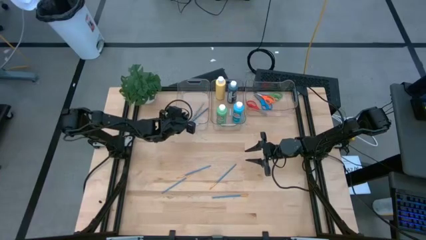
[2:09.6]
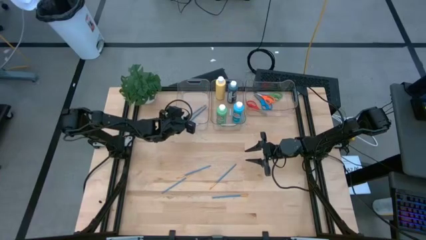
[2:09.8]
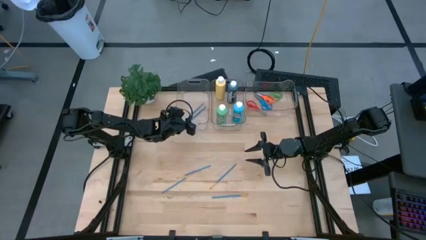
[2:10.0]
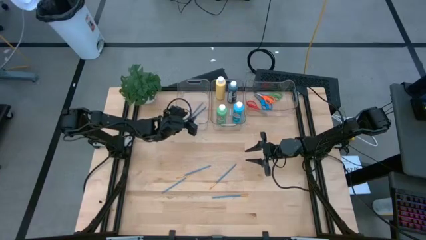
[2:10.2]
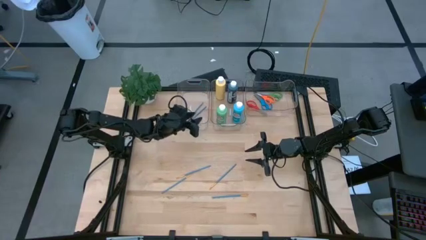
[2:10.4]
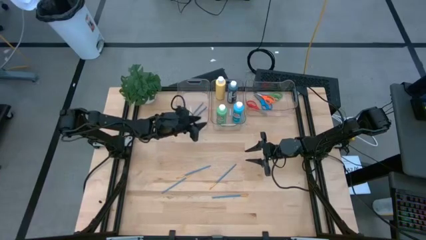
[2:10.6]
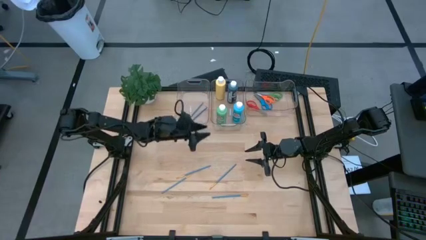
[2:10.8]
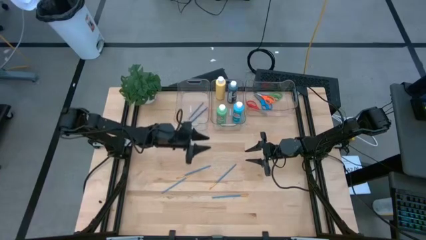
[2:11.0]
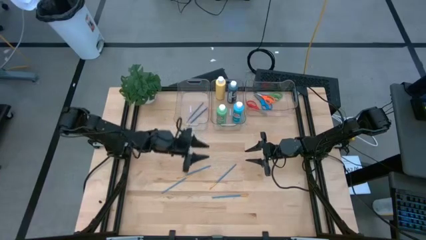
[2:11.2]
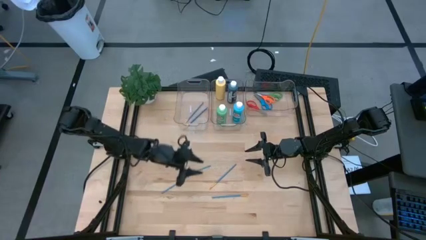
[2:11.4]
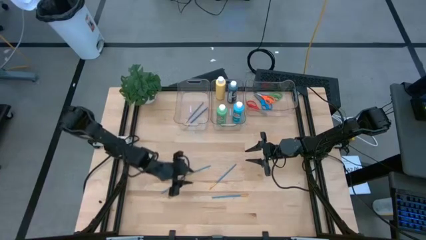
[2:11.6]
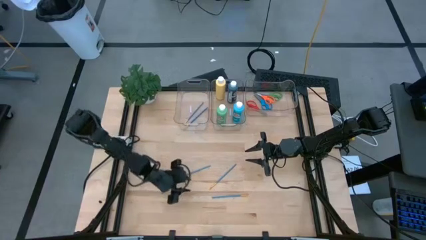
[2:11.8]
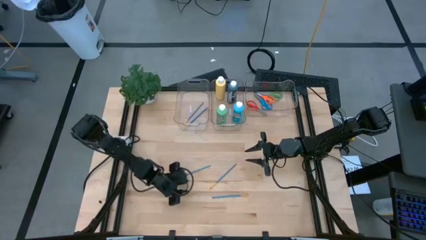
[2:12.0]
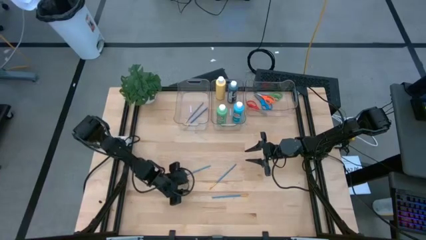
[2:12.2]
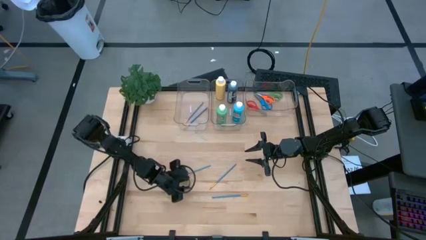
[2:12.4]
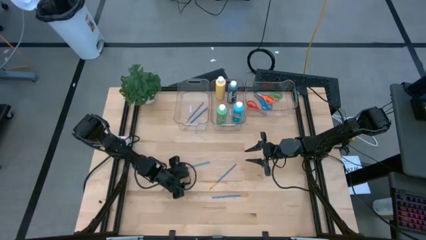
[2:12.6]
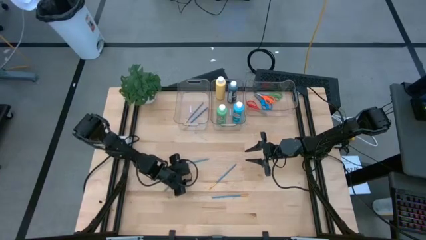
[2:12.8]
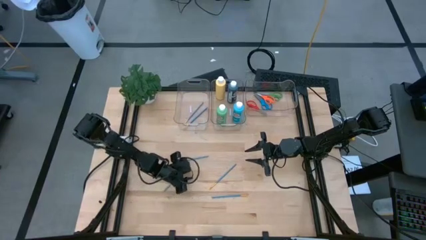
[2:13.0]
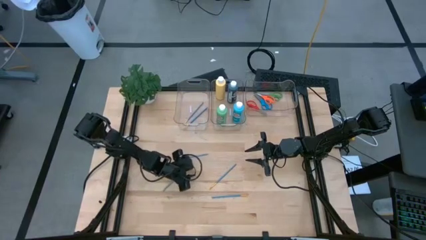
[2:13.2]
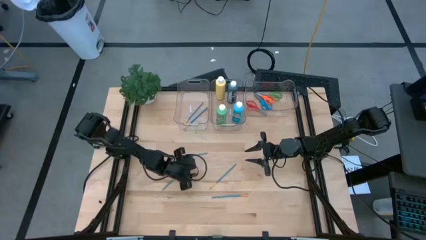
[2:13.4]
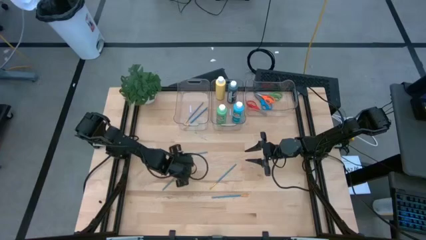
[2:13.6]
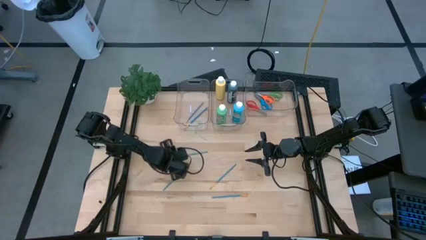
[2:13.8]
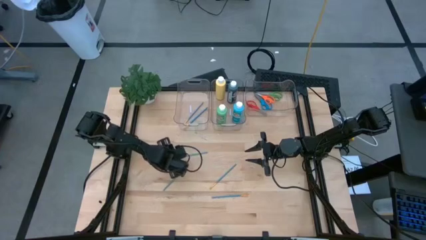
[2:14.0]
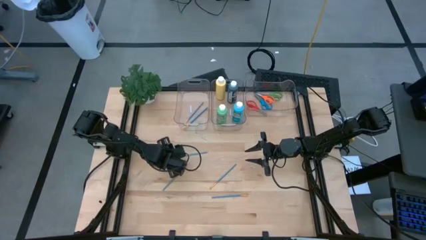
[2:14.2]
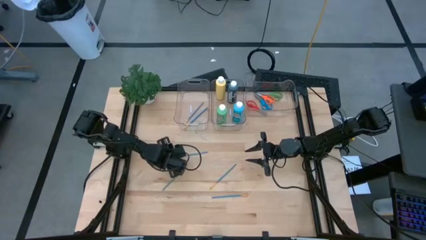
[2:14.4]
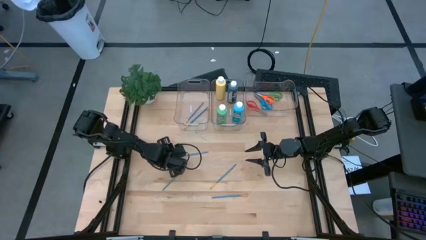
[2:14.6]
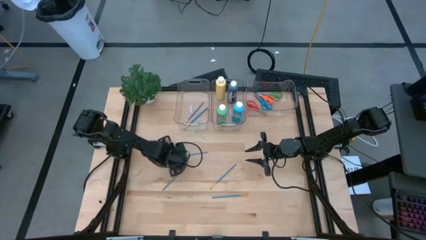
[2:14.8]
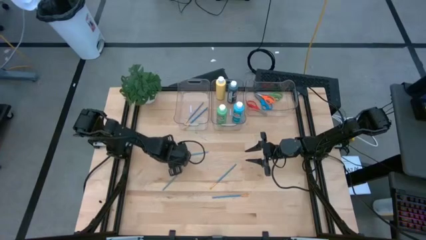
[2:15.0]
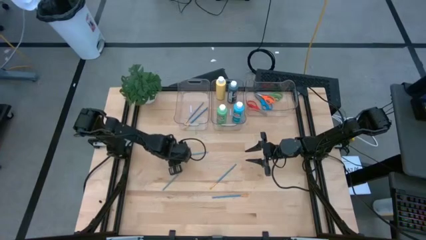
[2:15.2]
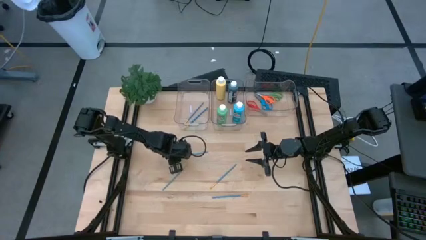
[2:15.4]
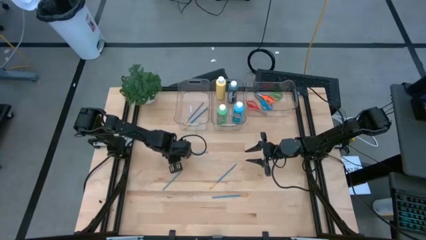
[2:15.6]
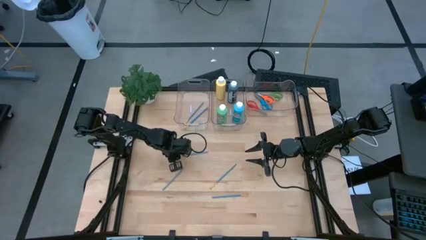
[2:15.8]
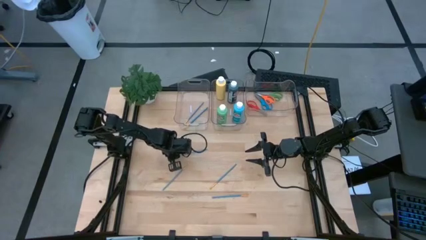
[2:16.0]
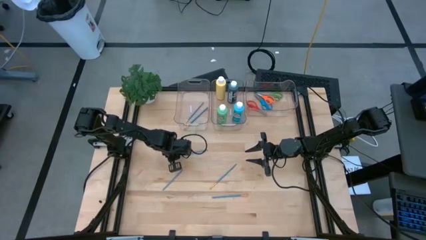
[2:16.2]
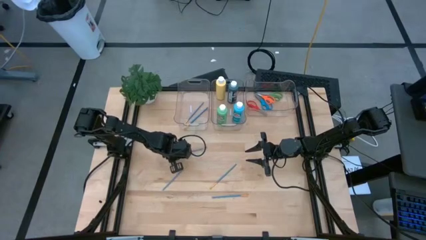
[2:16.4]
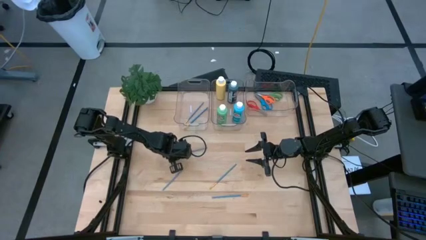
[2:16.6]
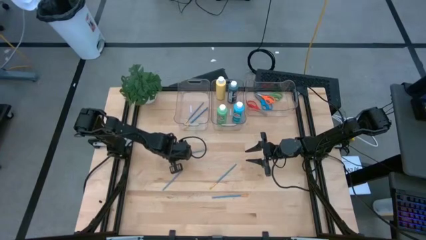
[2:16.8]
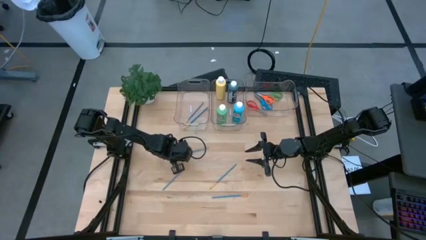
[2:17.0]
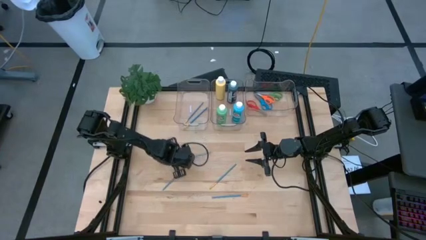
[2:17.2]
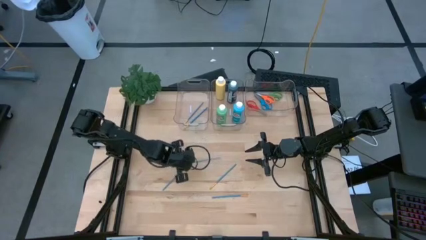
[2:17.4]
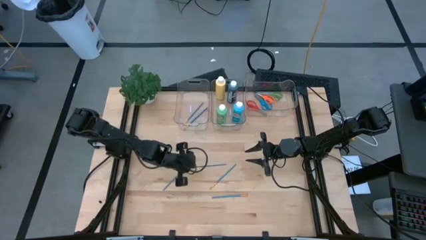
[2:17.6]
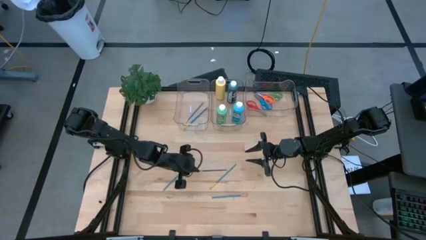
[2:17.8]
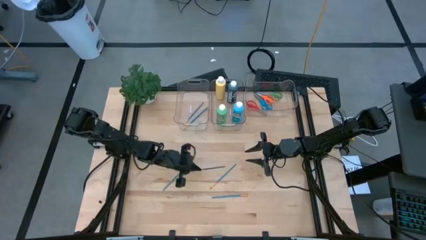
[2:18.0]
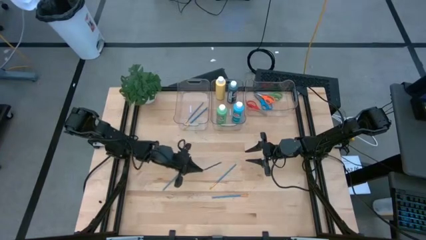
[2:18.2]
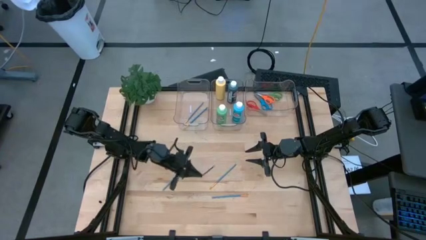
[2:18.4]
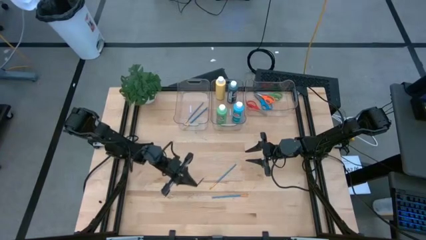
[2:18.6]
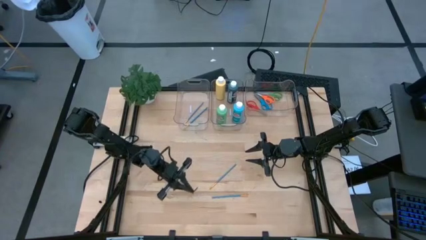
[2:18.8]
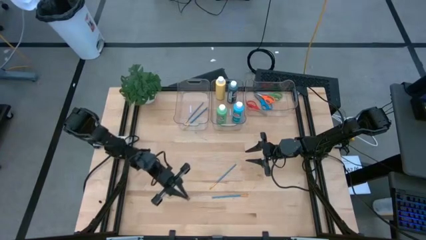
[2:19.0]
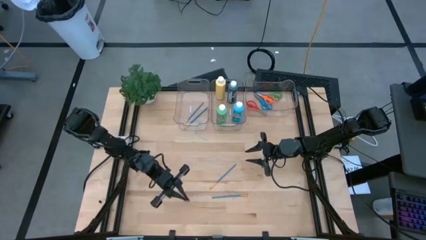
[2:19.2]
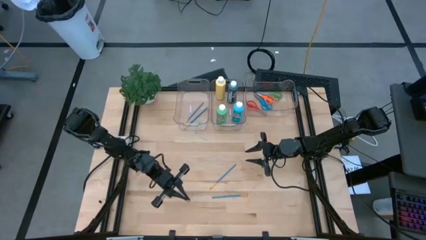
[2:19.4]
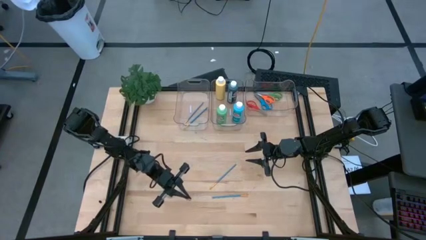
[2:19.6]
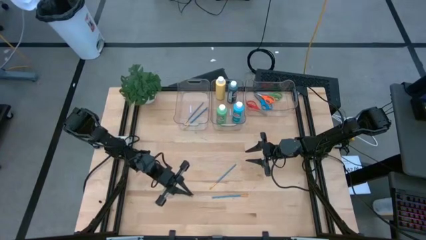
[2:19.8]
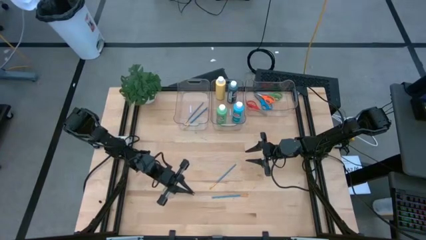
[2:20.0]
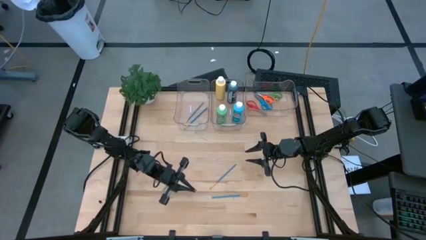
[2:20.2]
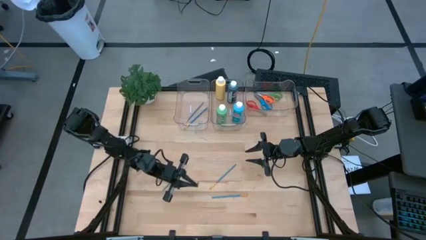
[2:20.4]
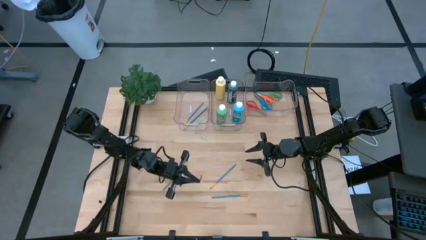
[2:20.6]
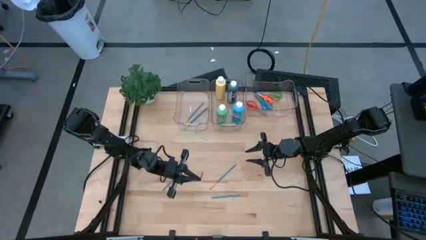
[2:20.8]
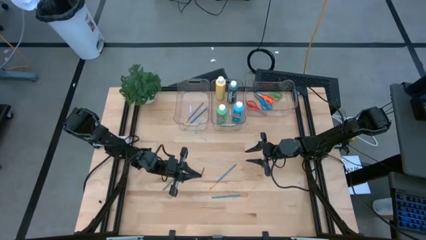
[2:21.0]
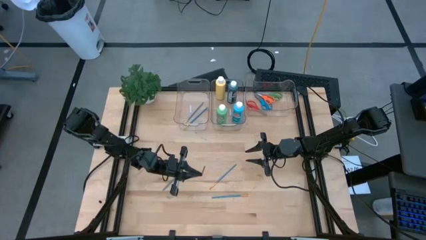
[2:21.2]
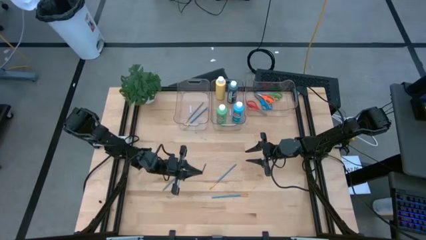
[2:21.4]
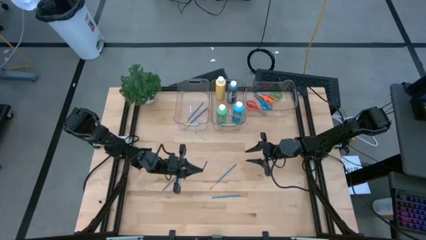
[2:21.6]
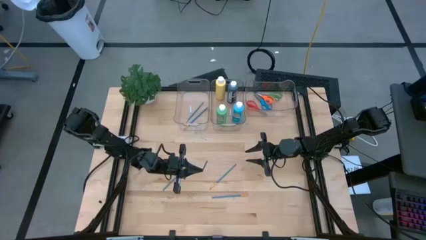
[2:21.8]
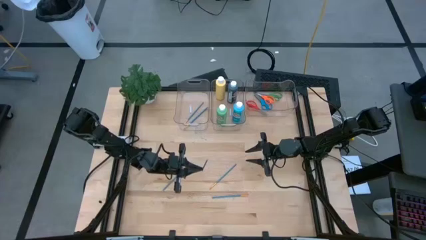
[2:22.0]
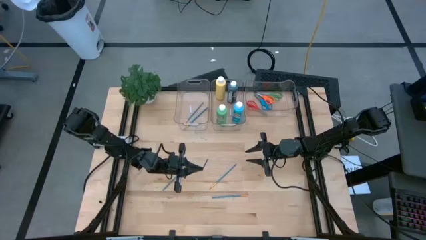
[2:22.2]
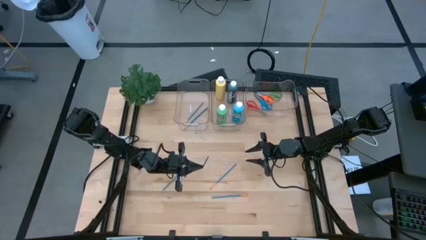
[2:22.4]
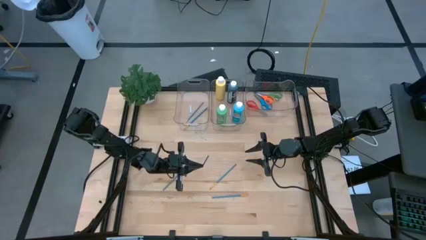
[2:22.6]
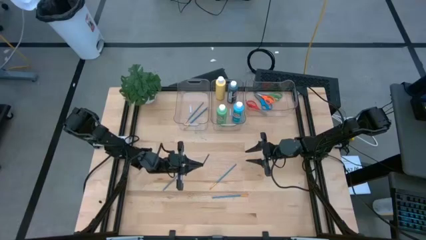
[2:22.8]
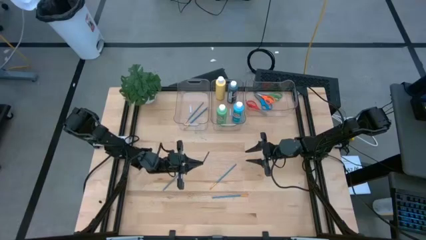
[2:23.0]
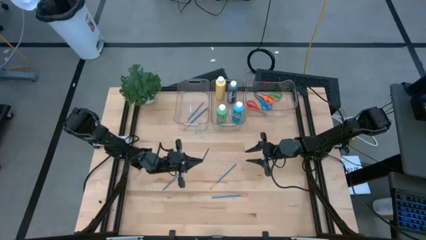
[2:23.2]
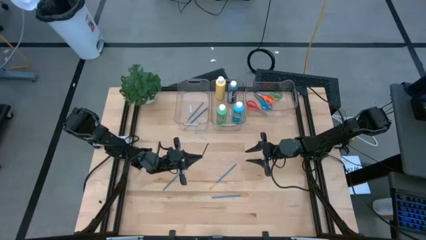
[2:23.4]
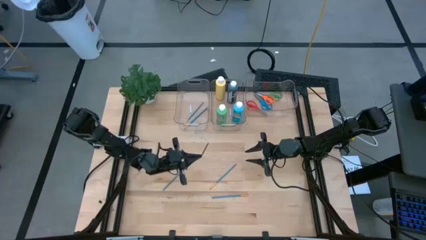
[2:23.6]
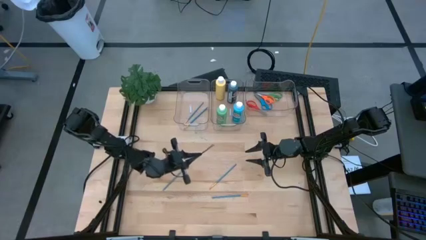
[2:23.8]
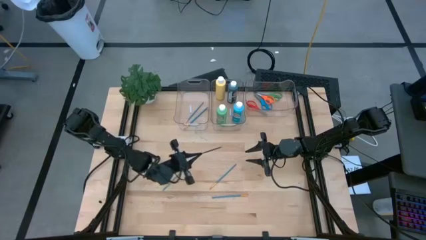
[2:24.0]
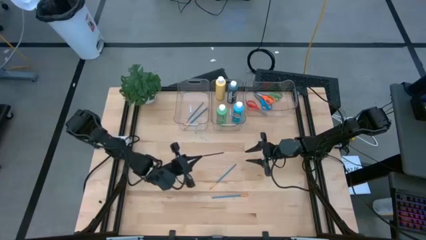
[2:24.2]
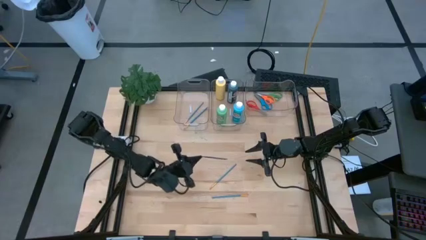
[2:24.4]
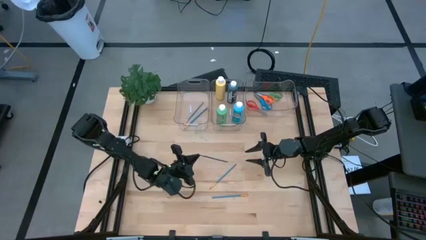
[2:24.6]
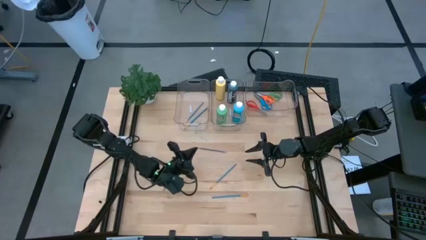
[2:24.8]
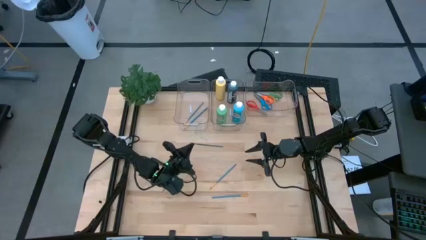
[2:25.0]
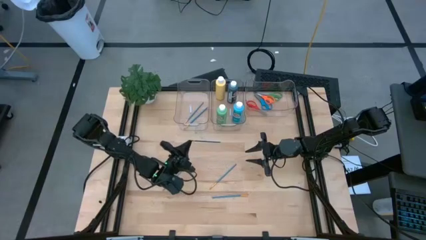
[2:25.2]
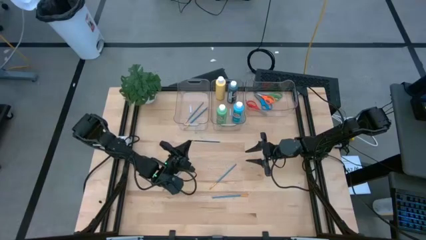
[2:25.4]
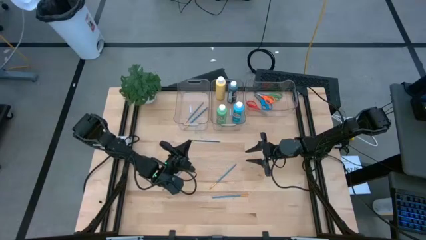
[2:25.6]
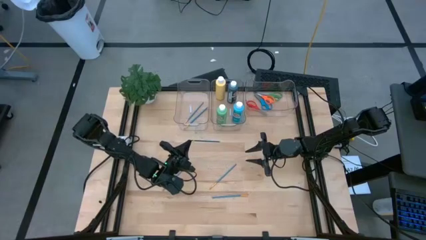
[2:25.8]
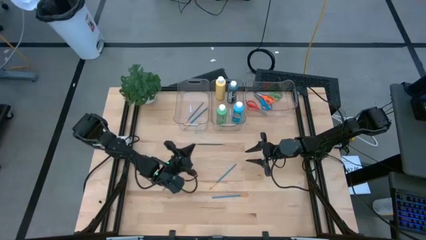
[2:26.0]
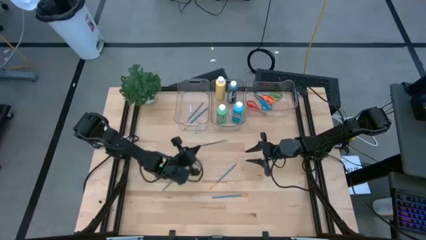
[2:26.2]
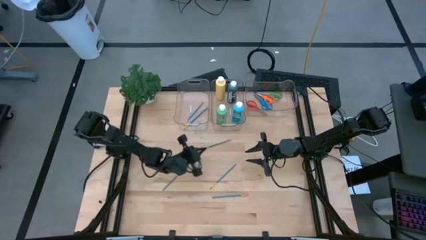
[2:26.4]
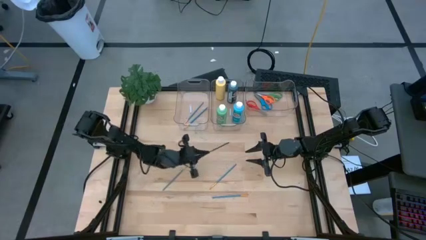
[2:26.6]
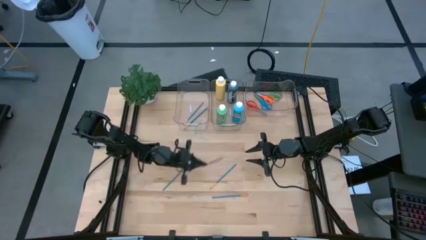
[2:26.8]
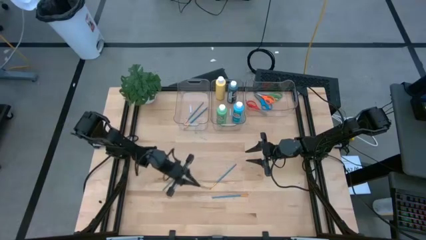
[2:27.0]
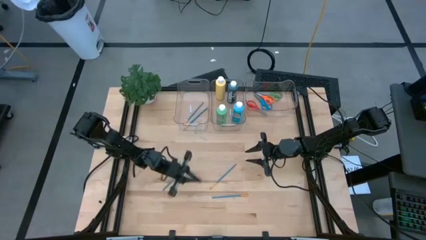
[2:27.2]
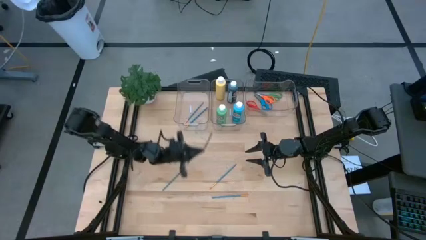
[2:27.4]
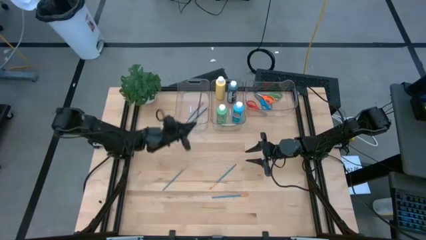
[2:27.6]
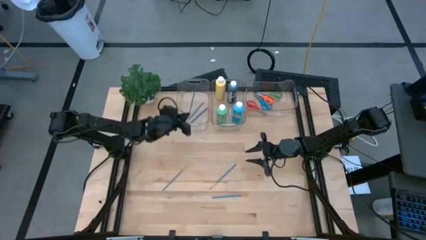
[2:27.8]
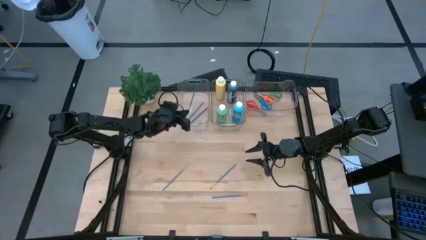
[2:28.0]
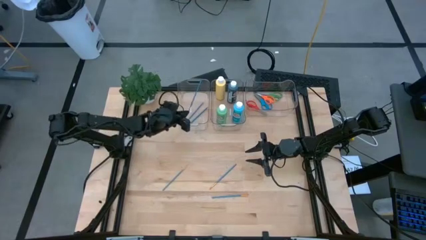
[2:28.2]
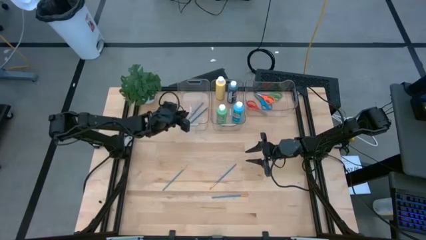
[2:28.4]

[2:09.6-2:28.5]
Task: Pick & Place Paint Supplies
Put the blue paint brush into the left transparent bin
